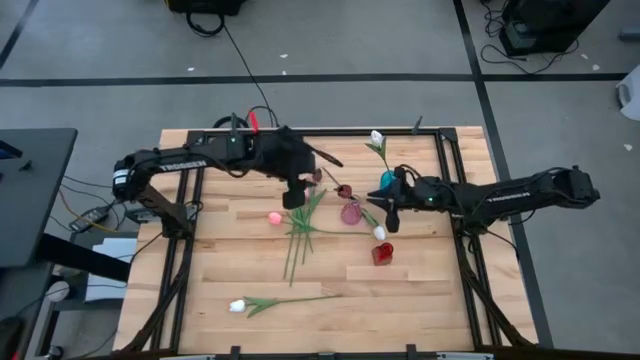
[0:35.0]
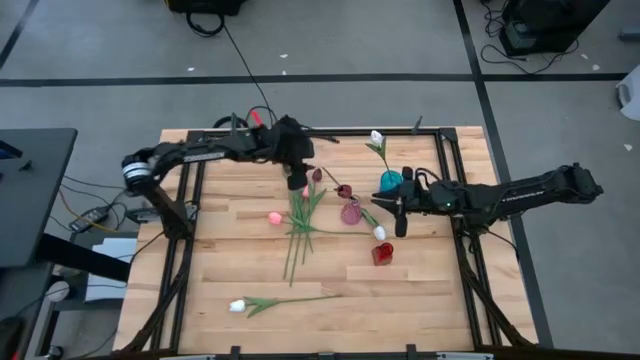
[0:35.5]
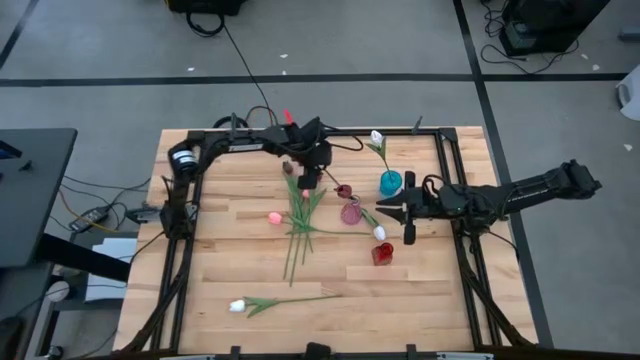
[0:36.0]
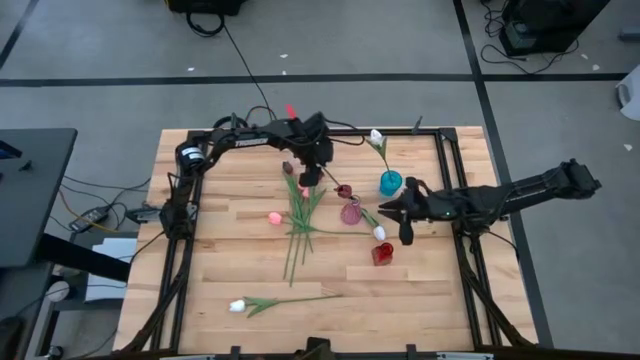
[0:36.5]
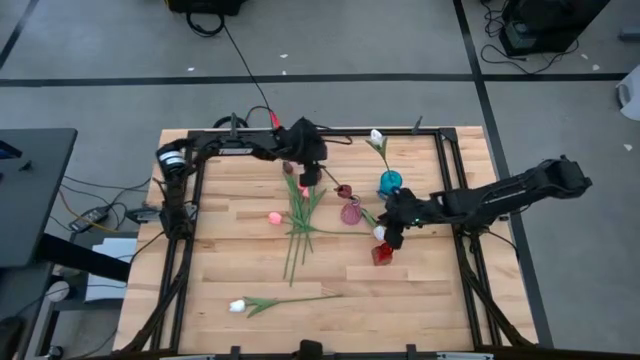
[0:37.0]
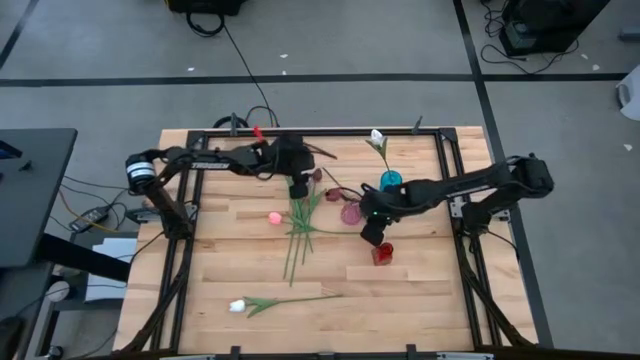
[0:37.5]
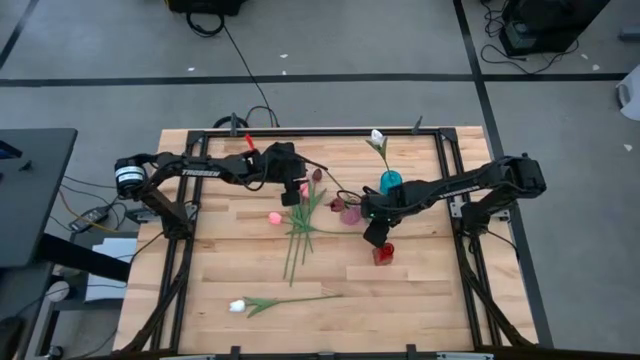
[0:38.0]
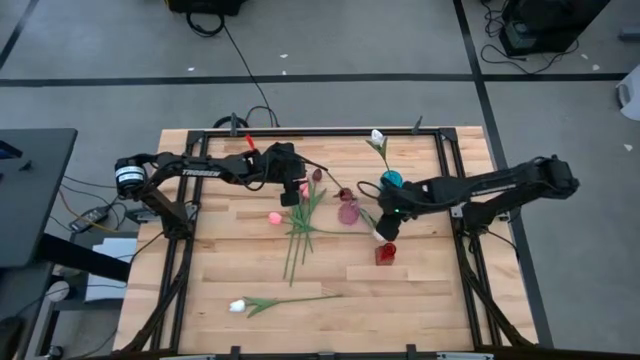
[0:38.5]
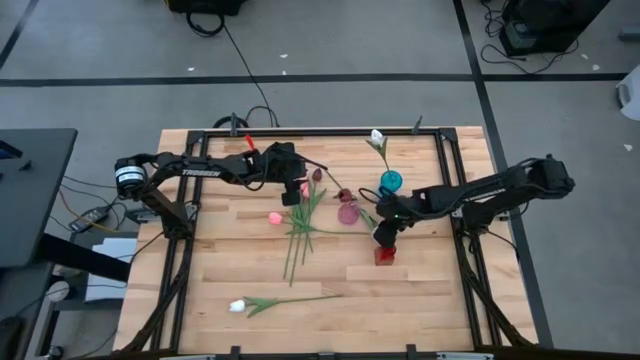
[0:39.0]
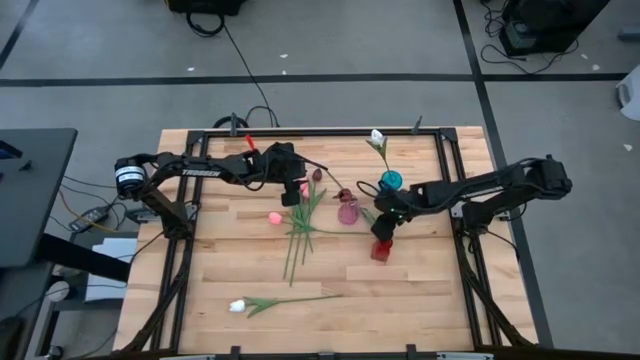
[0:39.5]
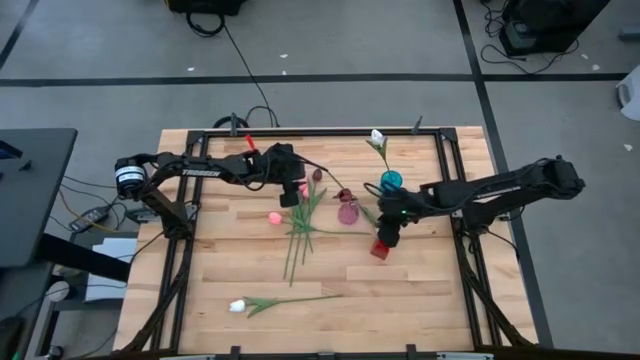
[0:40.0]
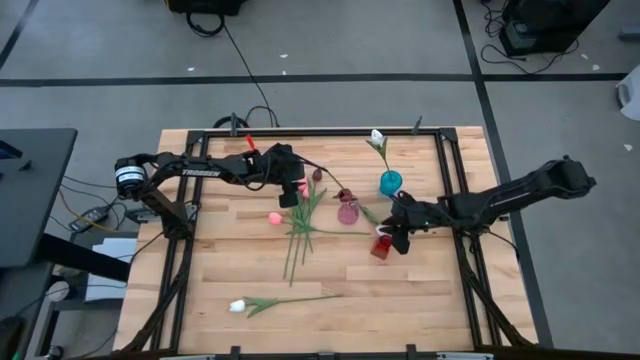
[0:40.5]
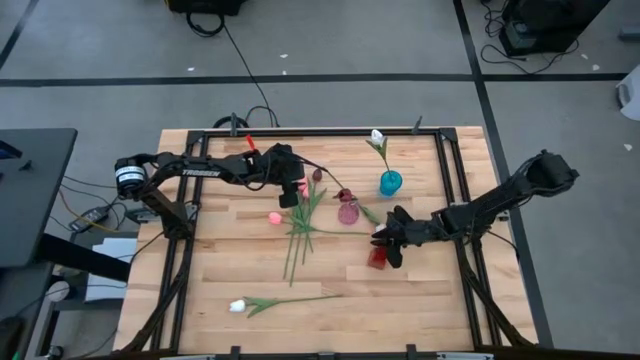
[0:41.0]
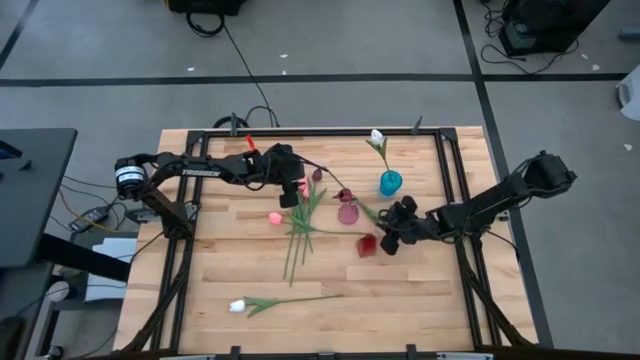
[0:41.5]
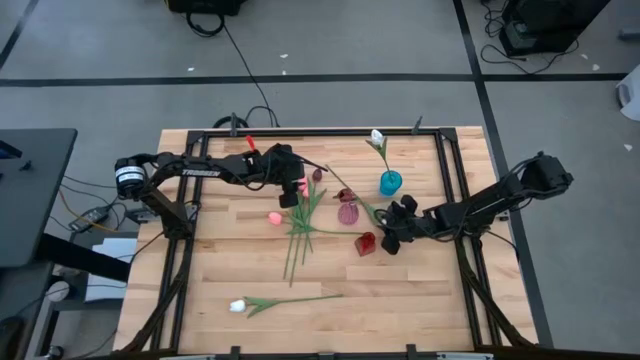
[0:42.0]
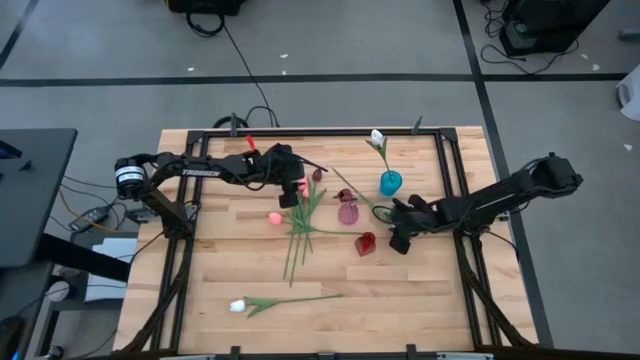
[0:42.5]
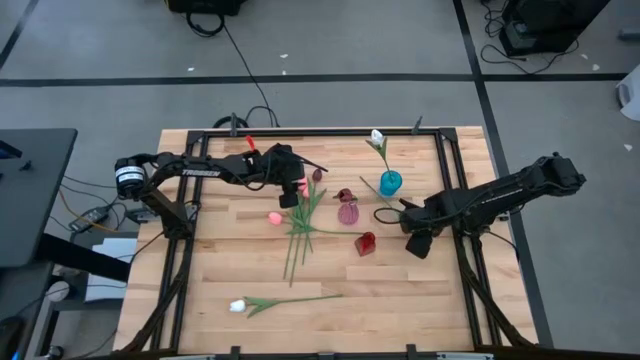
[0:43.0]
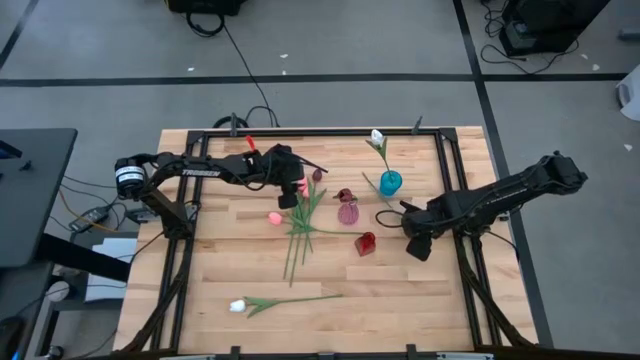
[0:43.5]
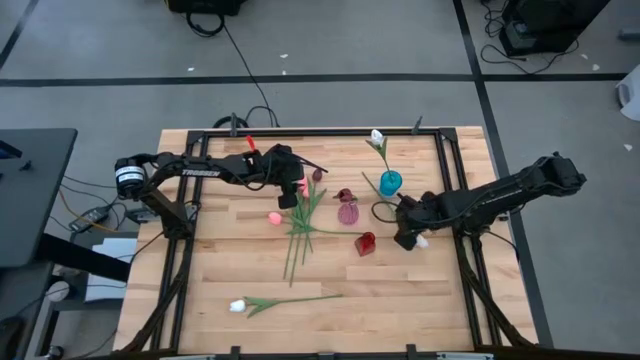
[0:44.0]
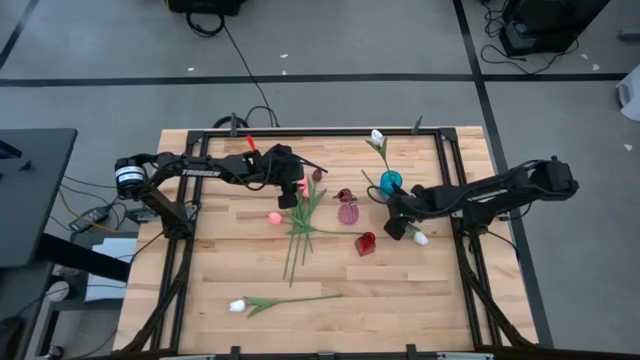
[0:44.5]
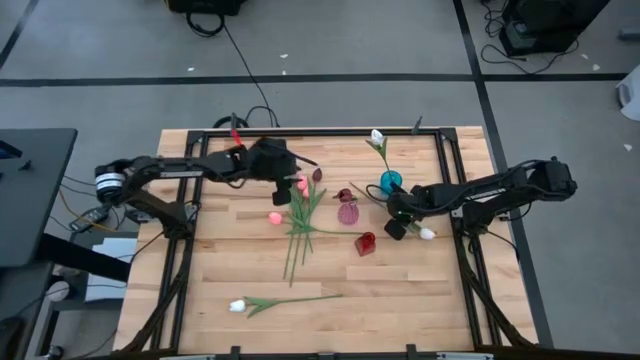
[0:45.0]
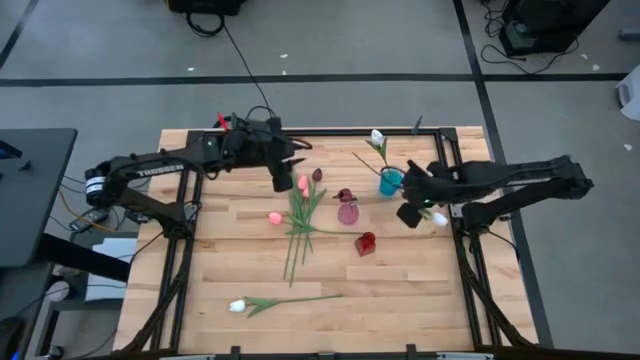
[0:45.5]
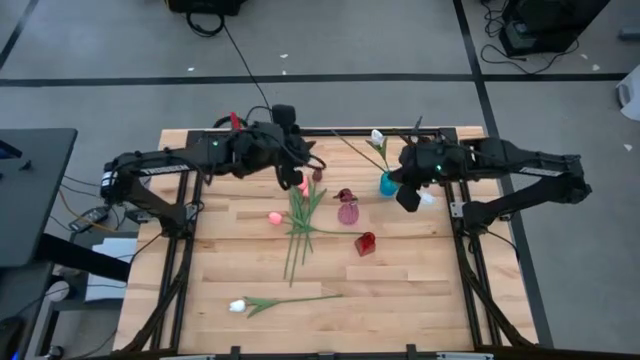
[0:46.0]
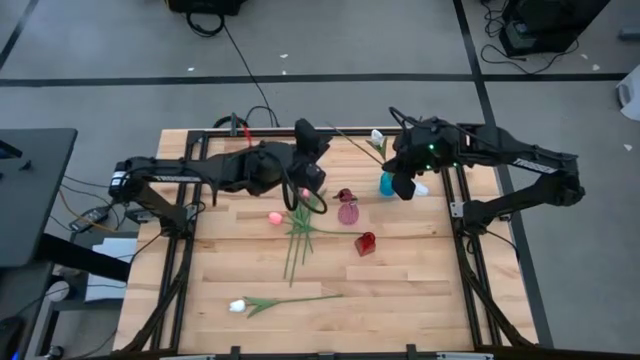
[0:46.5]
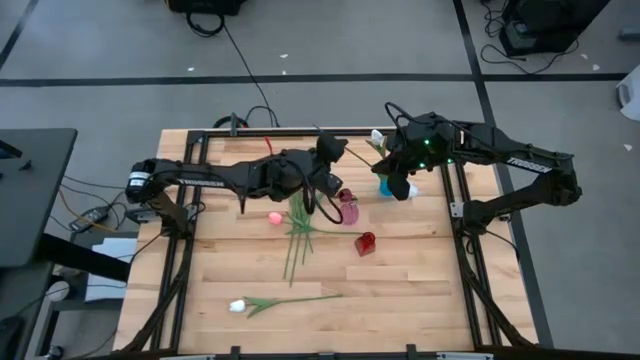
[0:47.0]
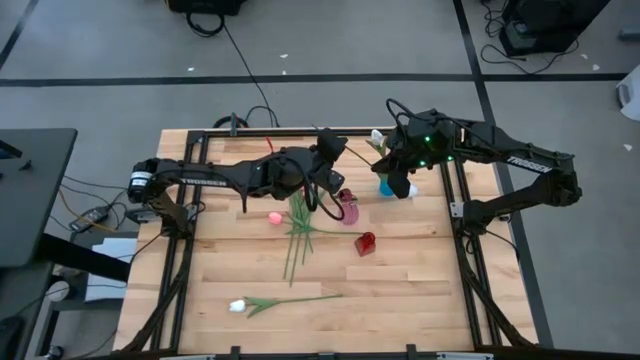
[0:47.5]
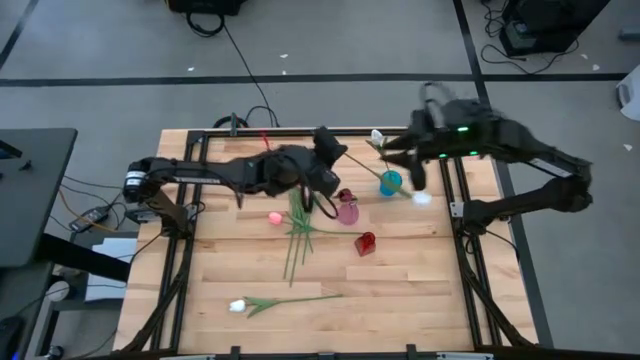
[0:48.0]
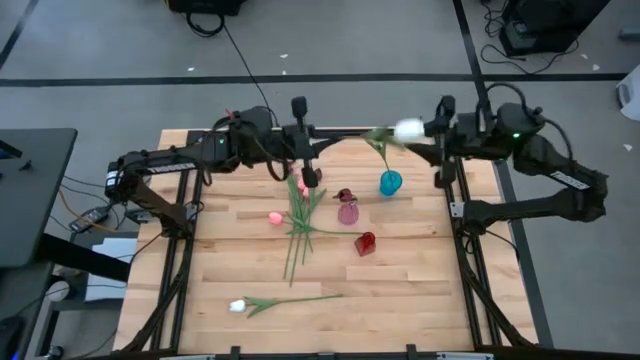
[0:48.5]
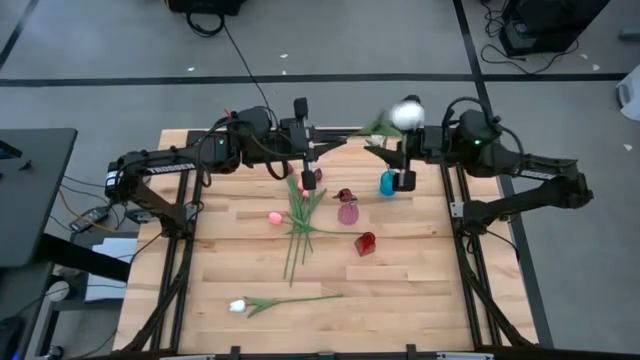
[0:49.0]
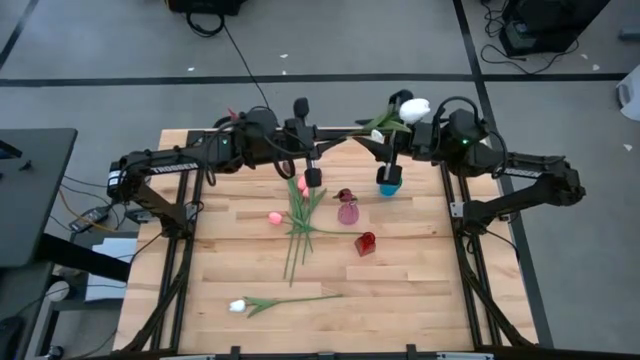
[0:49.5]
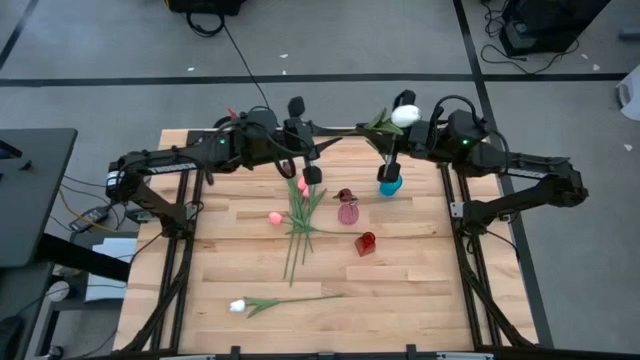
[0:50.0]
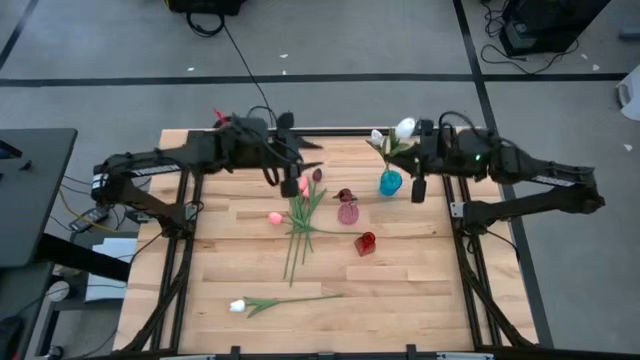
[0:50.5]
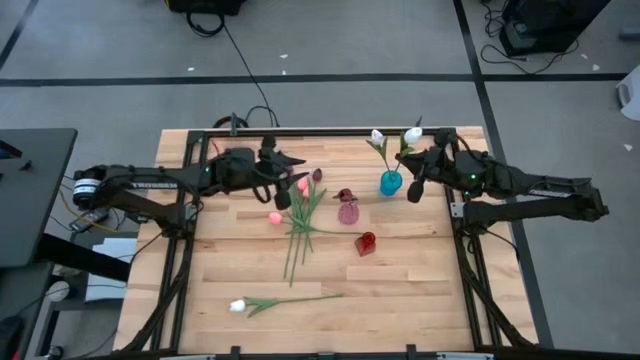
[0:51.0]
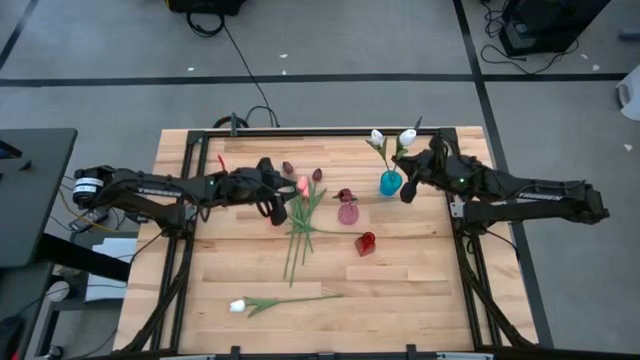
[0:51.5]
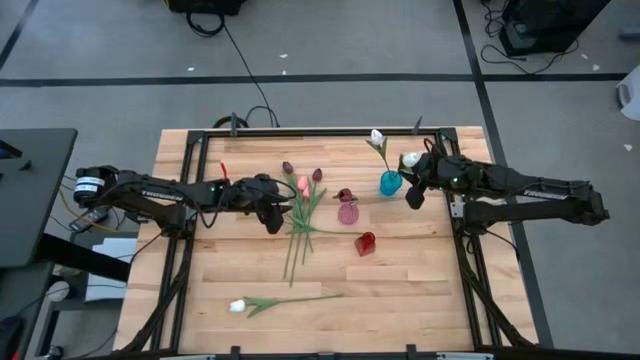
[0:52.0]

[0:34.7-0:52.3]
Task: Sort flowers into vase by color
Put the white flower into the blue vase

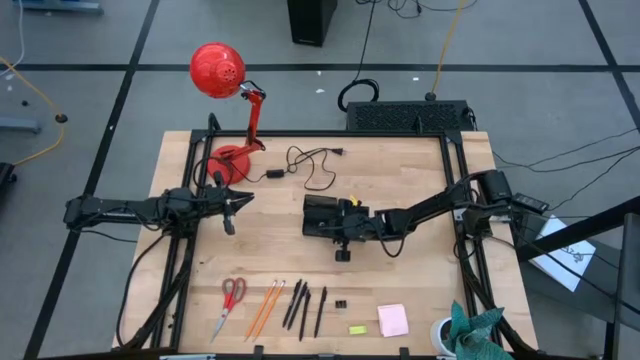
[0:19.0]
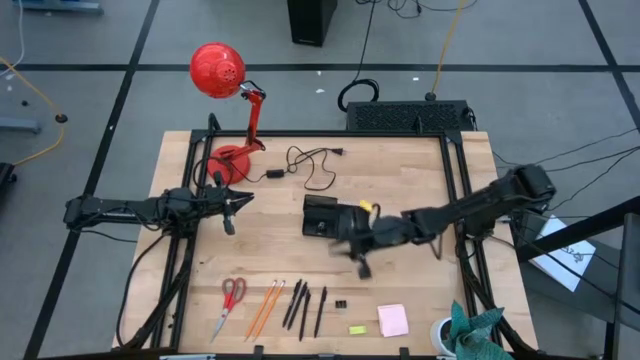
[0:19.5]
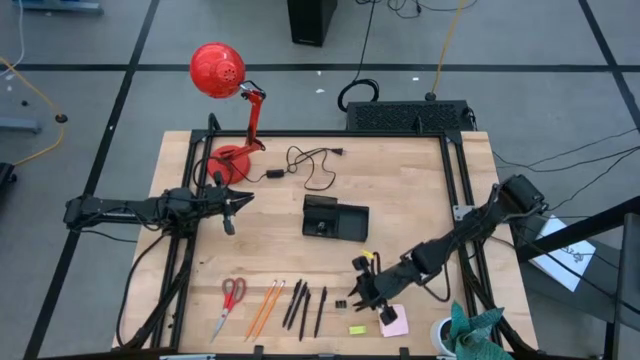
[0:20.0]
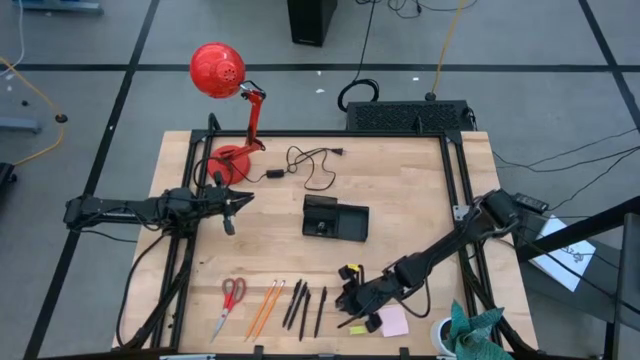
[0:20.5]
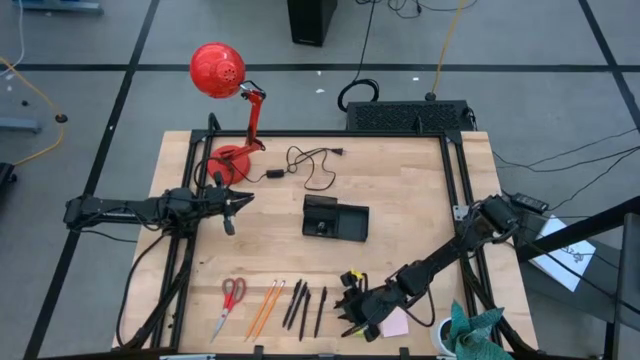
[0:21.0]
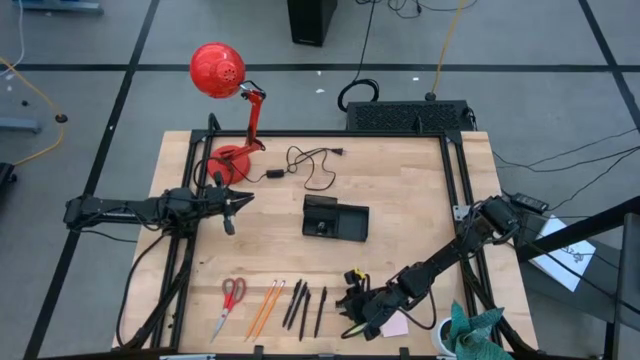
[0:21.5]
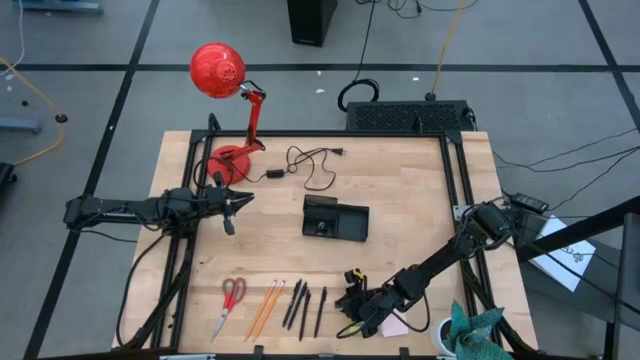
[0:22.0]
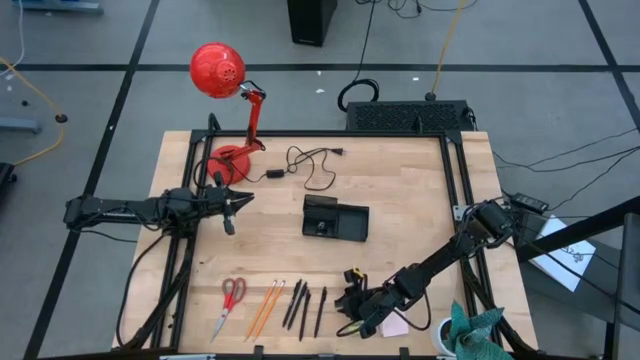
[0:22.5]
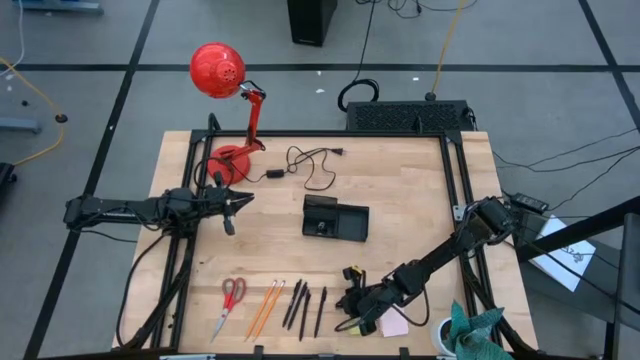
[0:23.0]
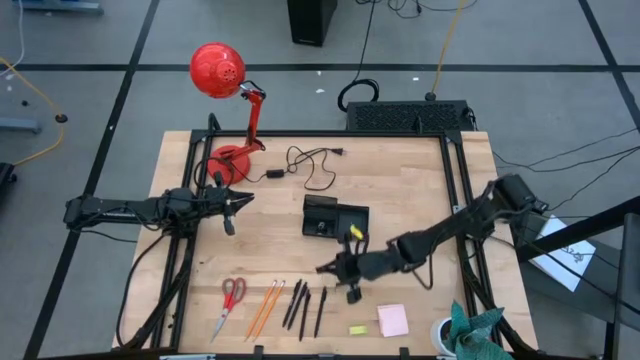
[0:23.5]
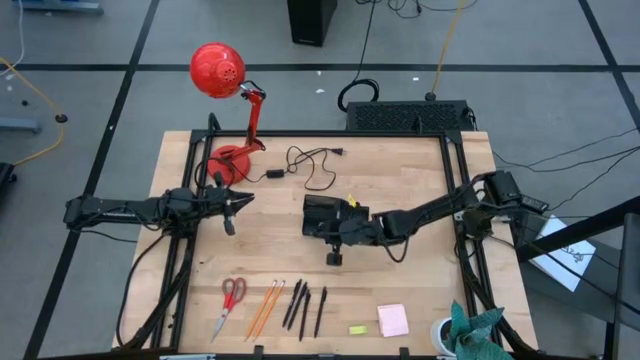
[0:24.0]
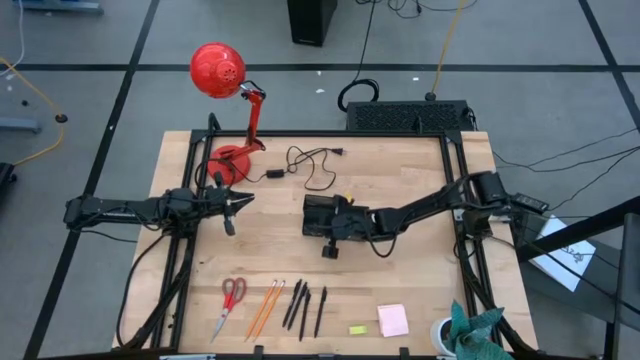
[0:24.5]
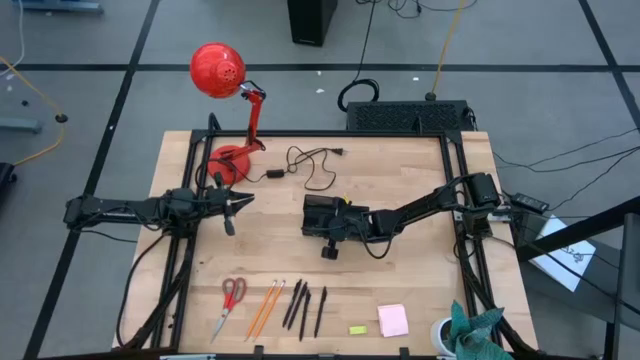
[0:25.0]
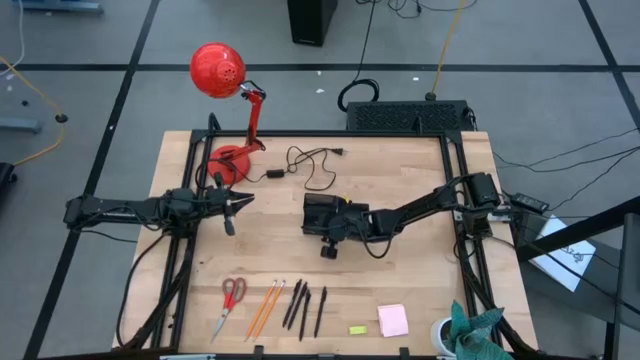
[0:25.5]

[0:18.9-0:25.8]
Task: Pick and place office supplies into organizer
Put the black binder clip into the black desk organizer
